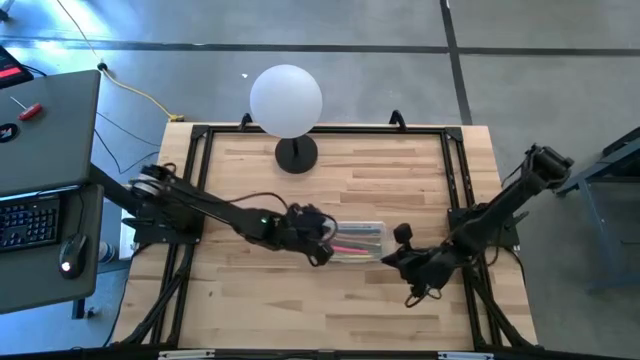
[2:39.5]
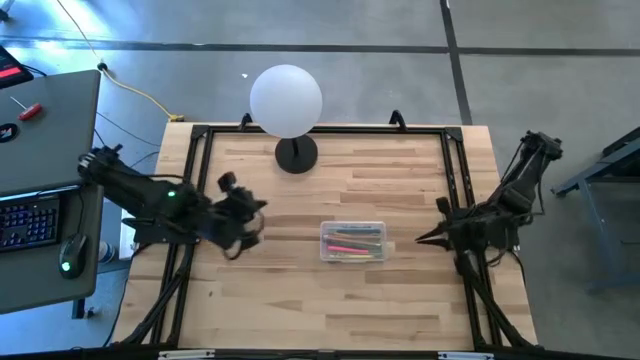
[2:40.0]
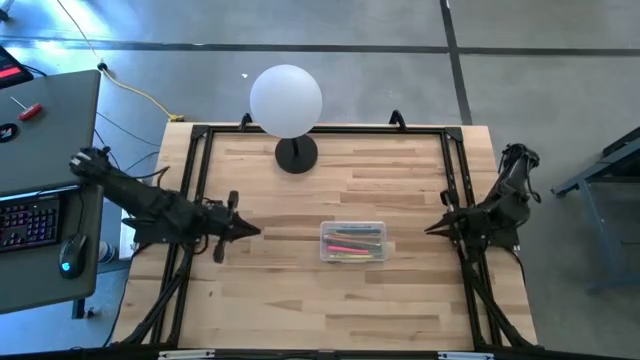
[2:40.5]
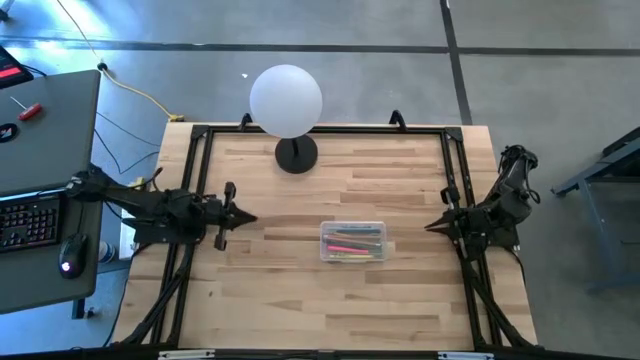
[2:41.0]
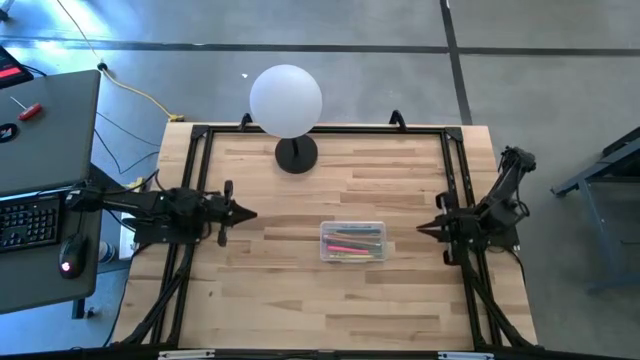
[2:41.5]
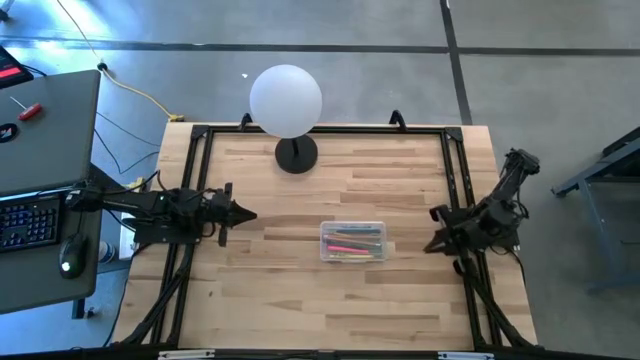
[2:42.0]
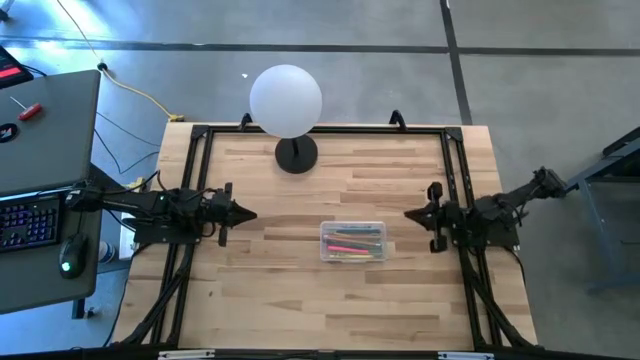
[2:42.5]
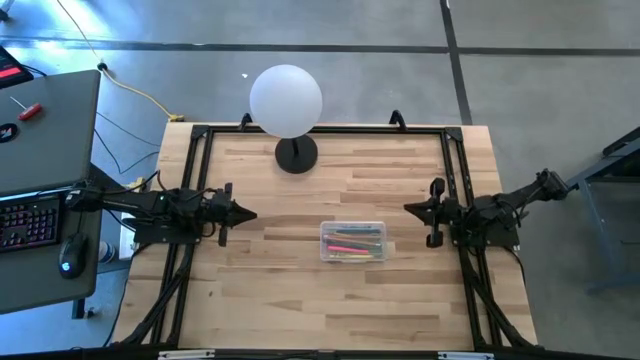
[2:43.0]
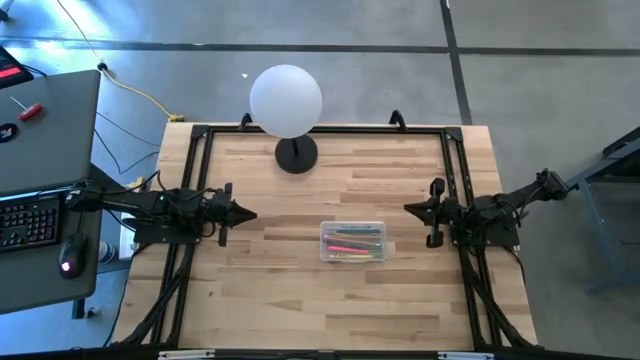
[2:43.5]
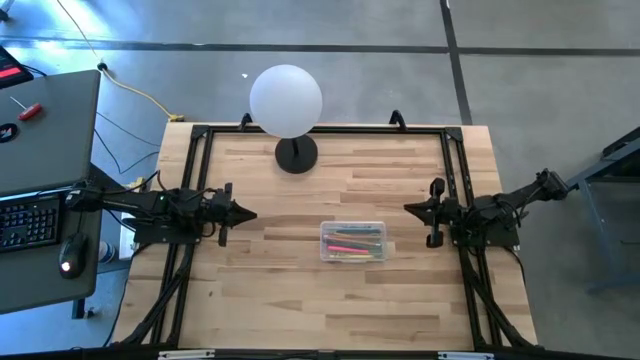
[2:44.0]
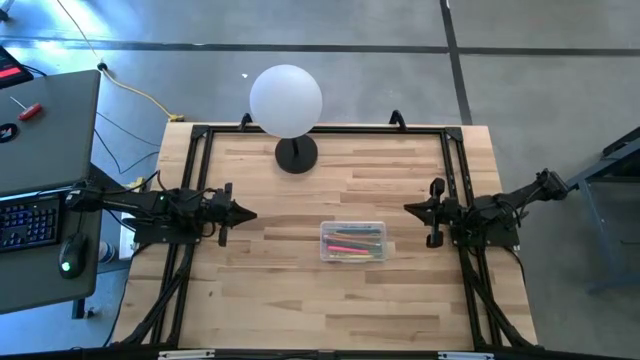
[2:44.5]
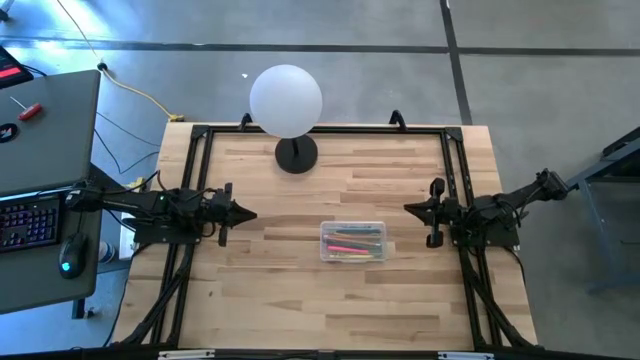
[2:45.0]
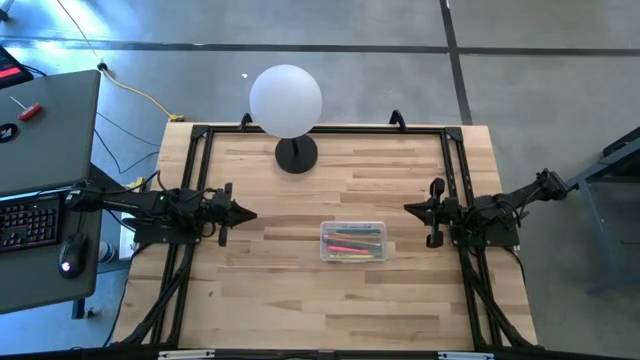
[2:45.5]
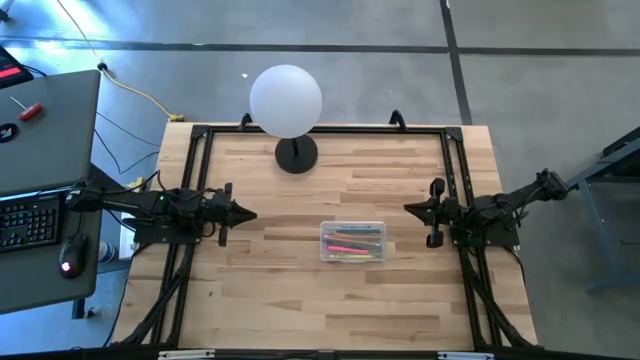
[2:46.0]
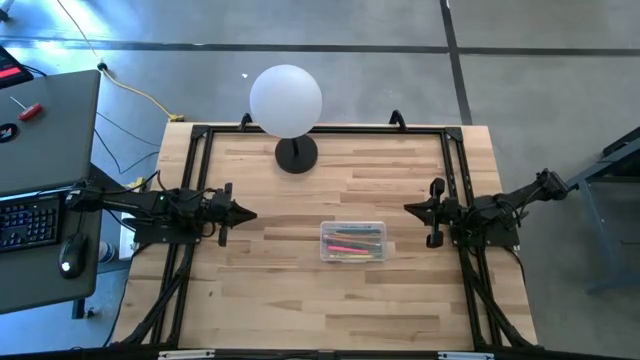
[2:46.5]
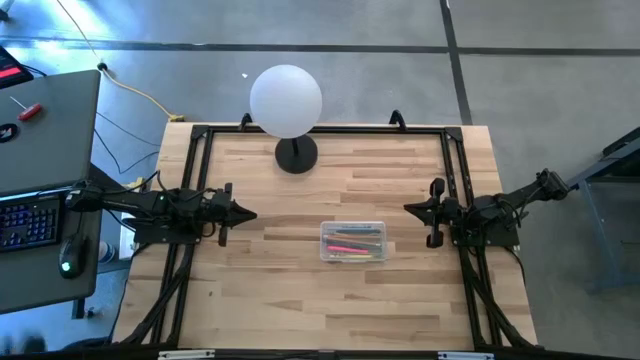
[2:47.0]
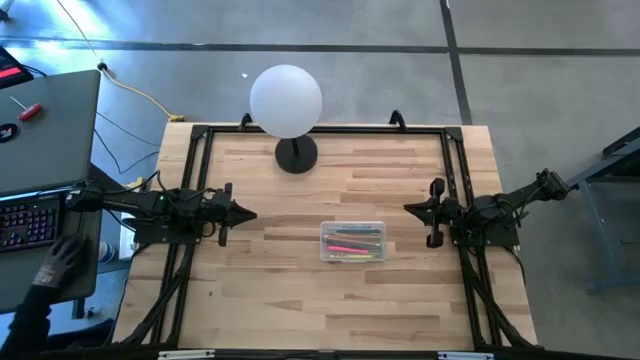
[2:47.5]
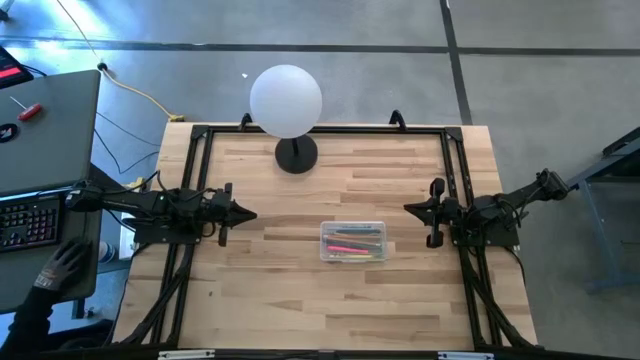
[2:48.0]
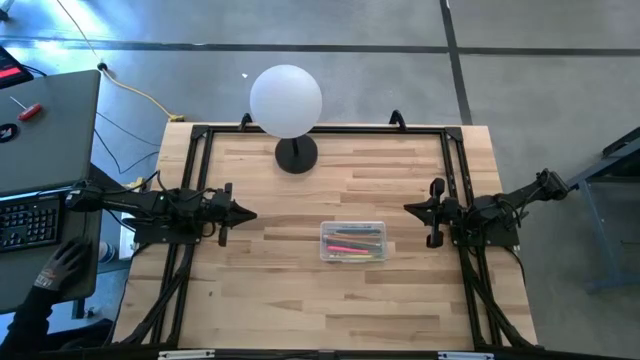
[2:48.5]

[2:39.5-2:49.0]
Task: Pick & place school supplies into a supply box
Return to Home Position

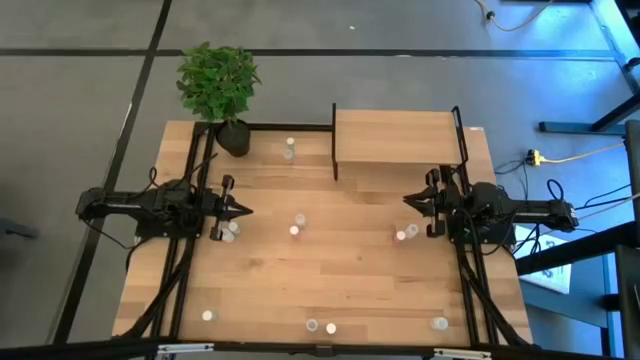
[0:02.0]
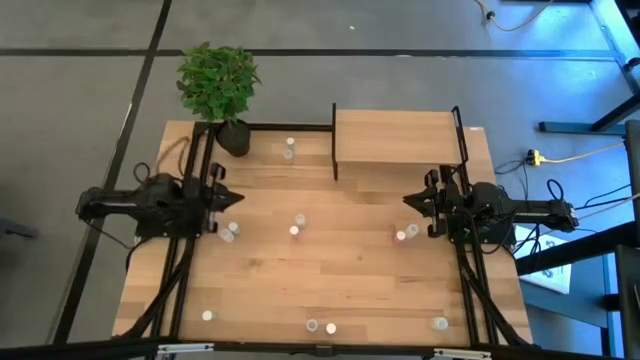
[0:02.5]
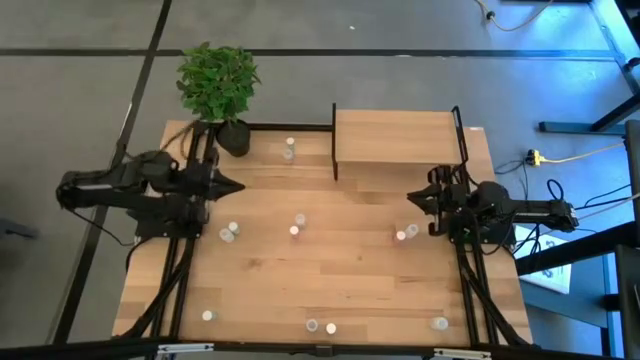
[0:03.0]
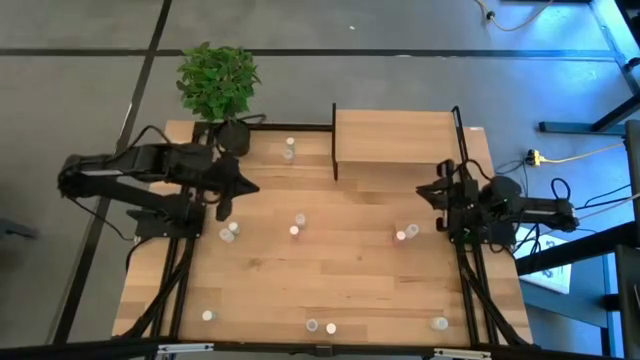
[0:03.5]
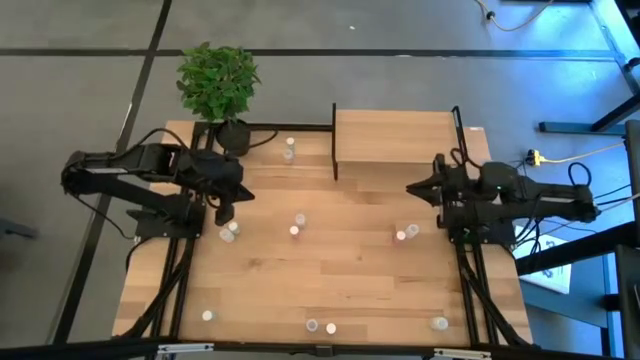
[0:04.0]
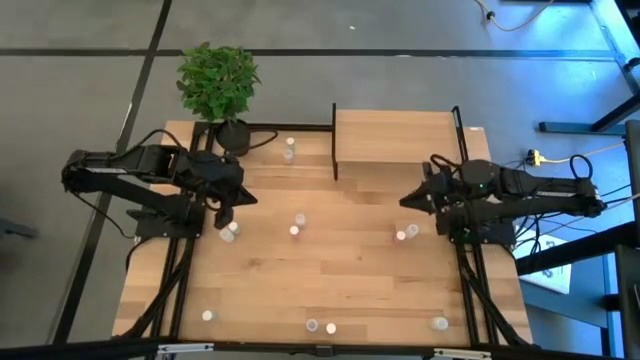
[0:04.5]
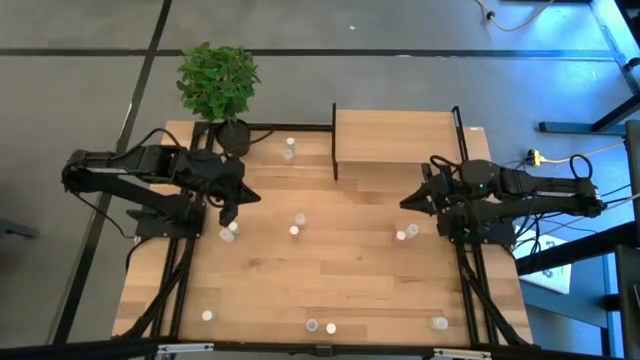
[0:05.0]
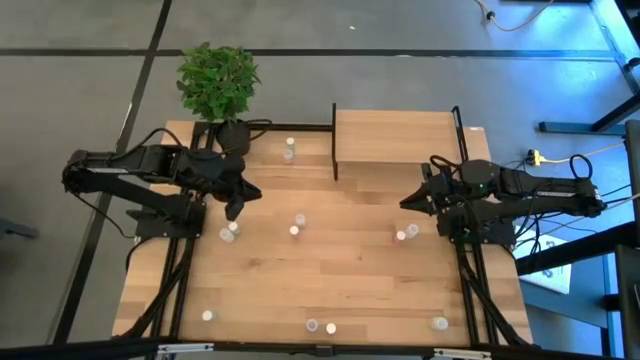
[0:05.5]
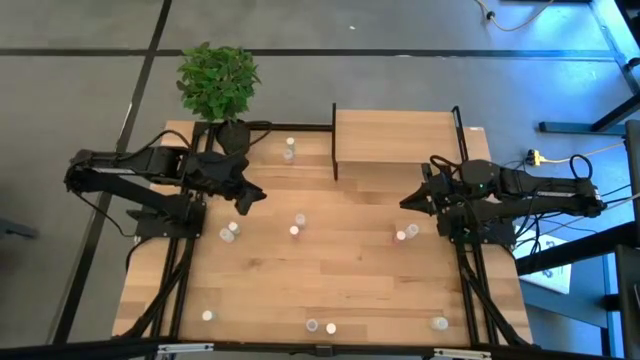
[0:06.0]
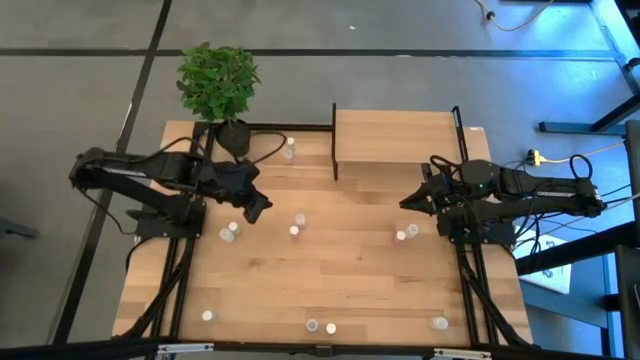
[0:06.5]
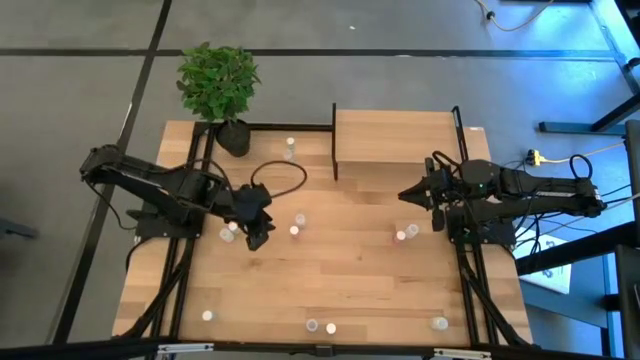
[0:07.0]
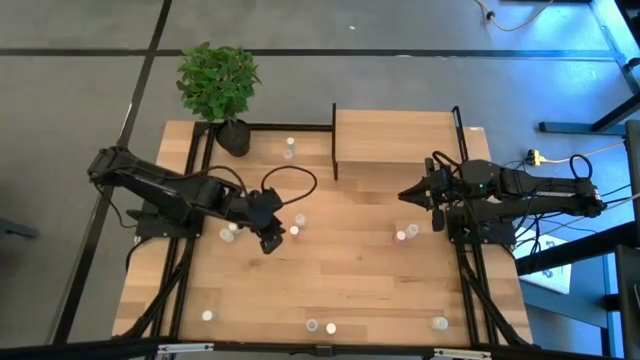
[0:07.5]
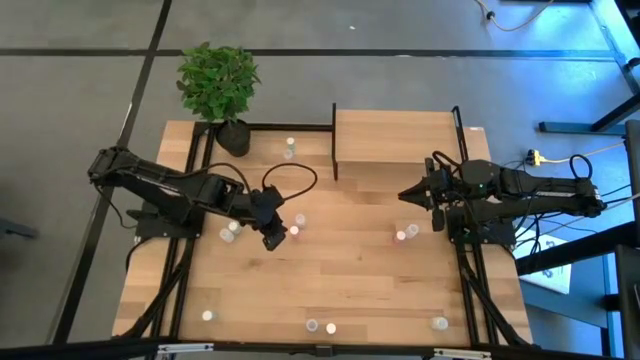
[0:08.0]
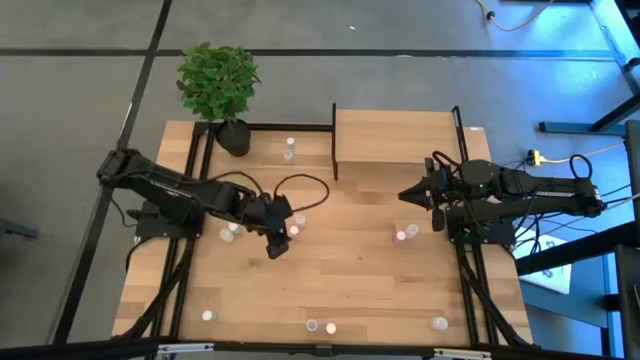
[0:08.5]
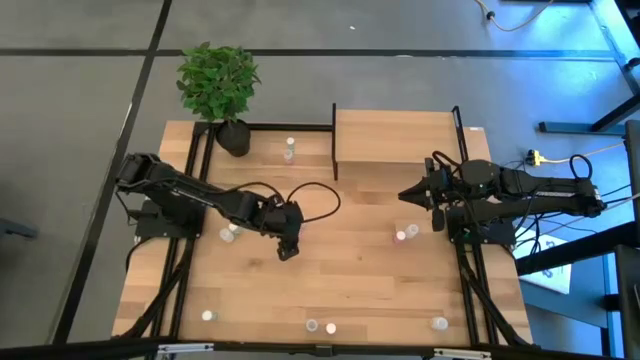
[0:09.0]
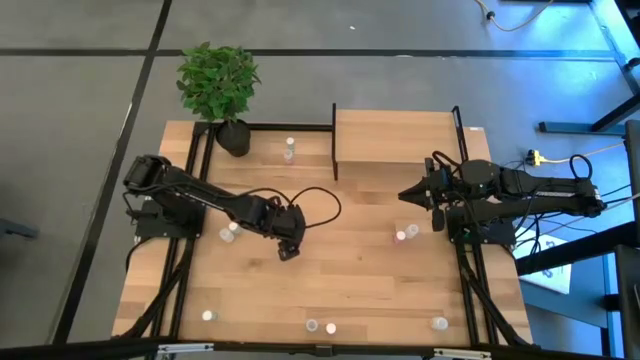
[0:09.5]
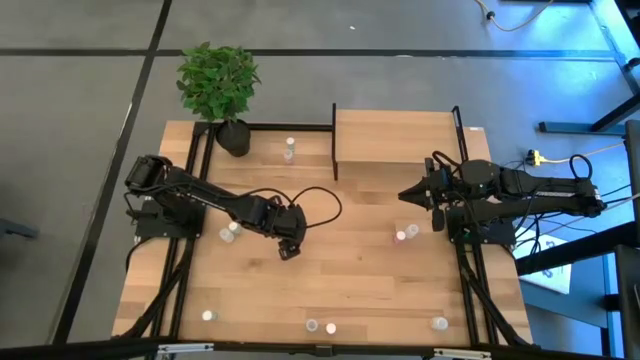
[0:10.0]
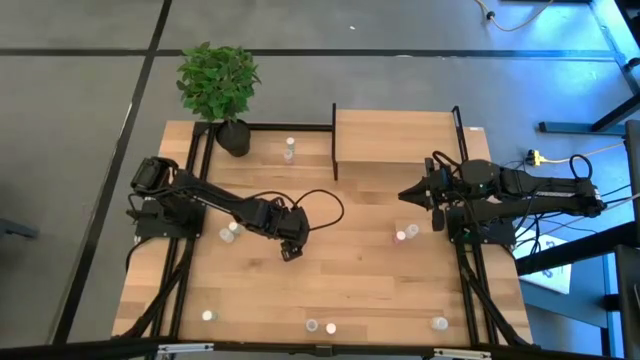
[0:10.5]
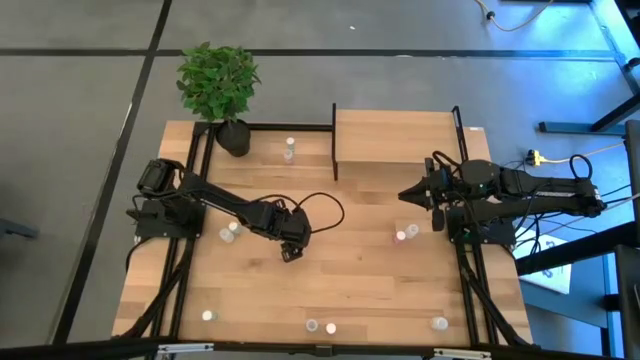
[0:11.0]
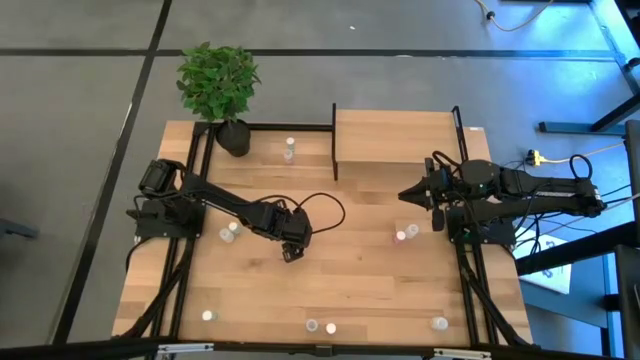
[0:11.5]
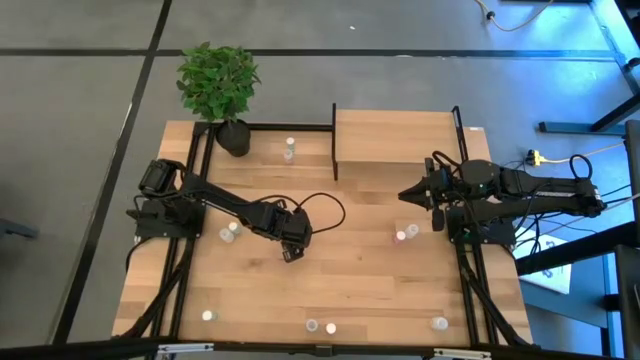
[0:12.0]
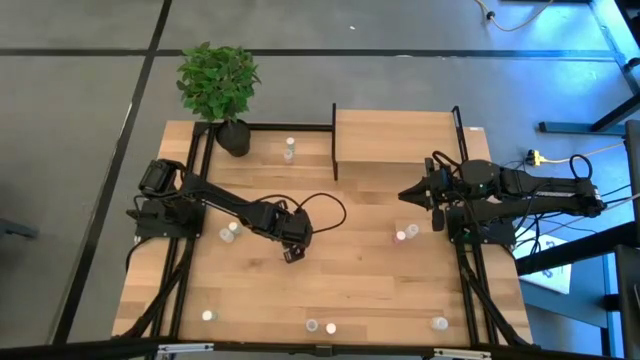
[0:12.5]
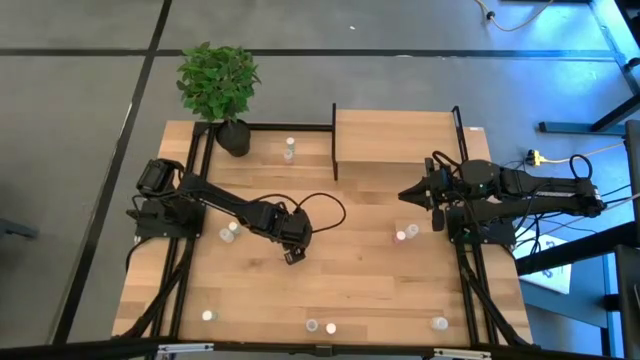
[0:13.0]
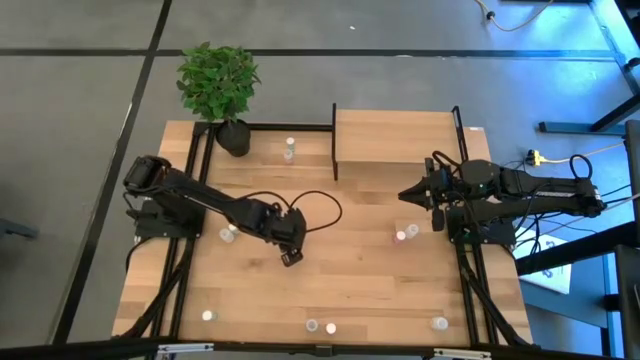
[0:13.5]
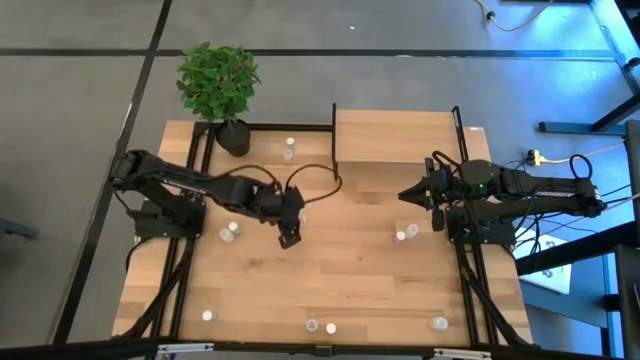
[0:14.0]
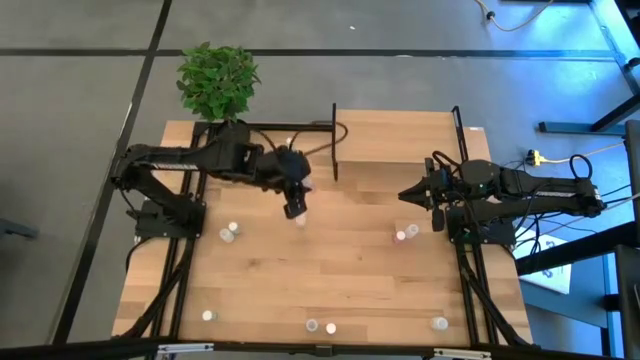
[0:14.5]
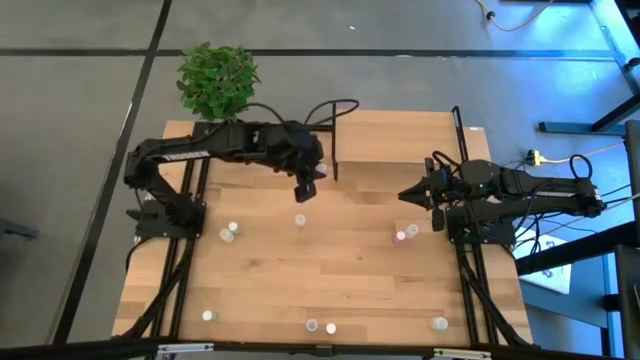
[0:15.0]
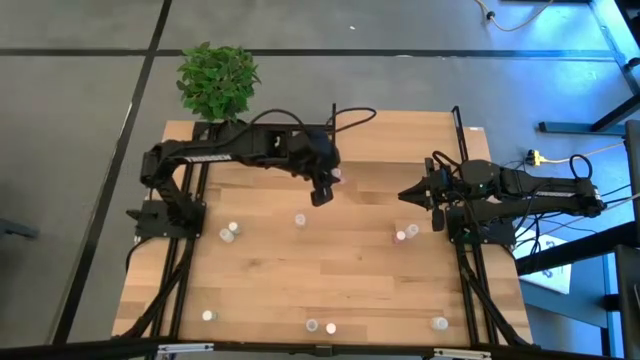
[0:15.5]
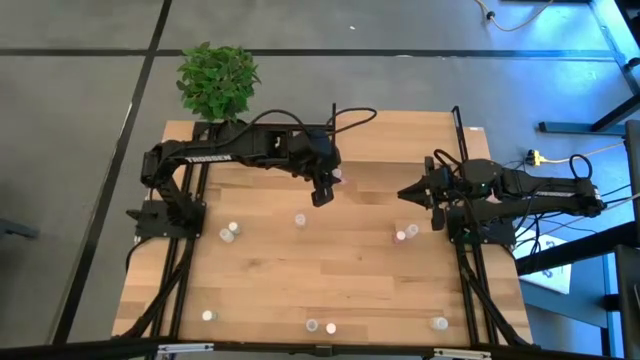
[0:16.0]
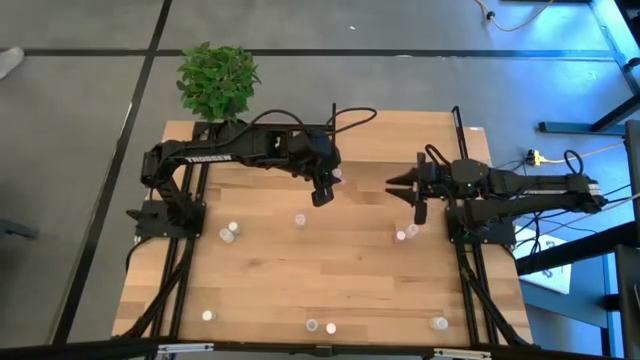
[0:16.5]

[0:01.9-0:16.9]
Task: Pick and place medicine bottles onto shelf by color
Put the top left pink pill bottle on the shelf
